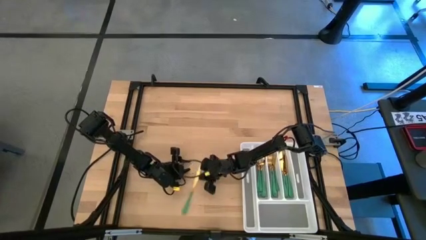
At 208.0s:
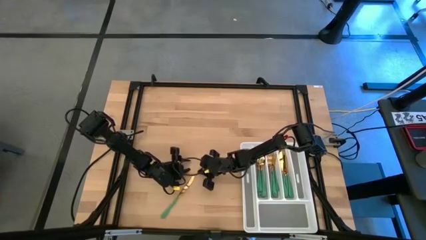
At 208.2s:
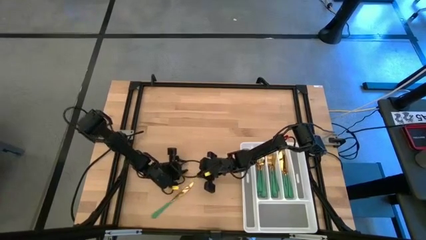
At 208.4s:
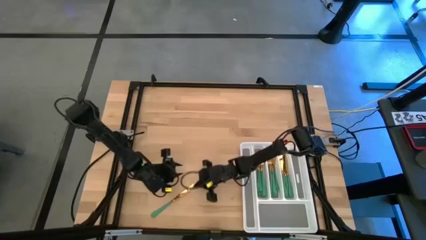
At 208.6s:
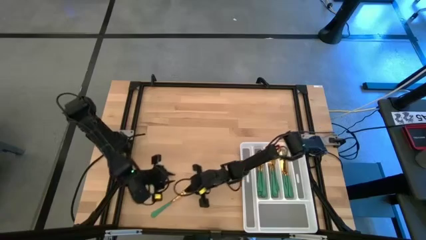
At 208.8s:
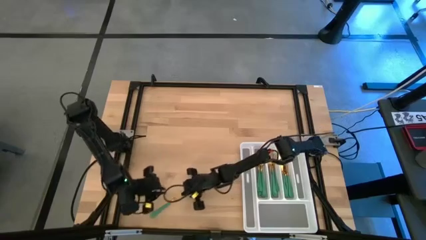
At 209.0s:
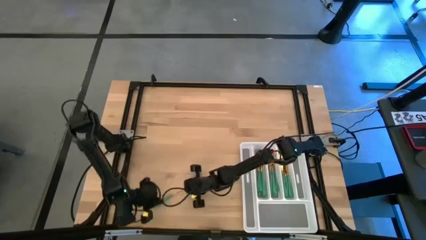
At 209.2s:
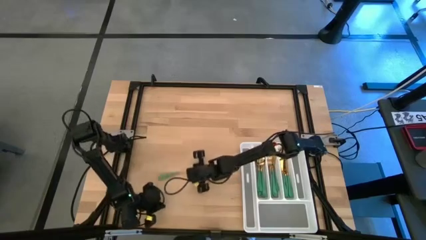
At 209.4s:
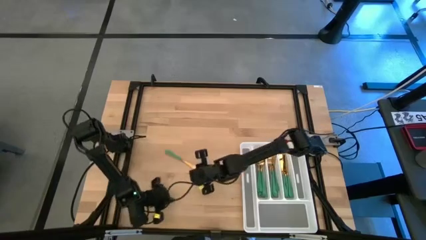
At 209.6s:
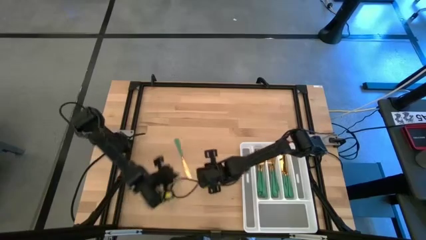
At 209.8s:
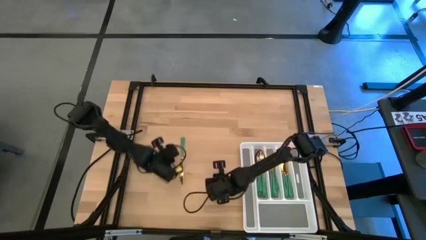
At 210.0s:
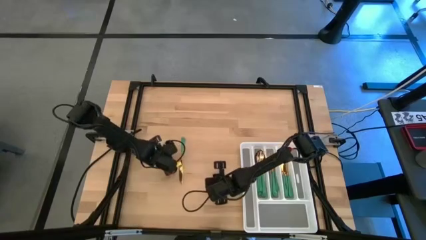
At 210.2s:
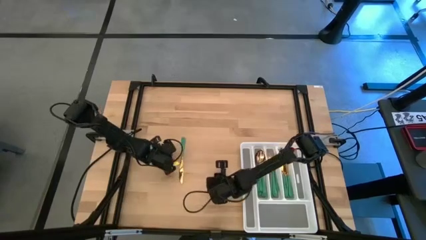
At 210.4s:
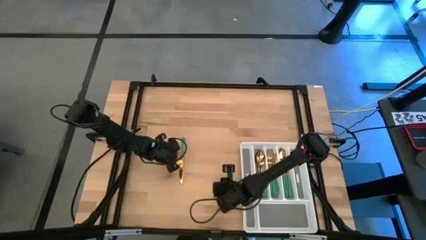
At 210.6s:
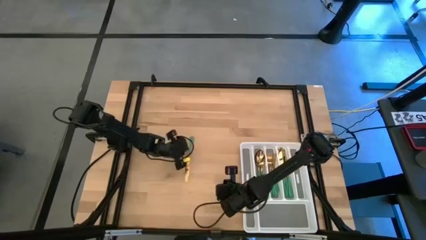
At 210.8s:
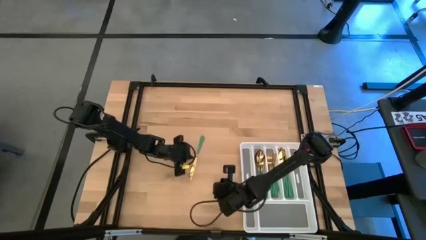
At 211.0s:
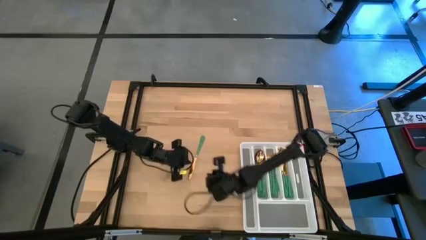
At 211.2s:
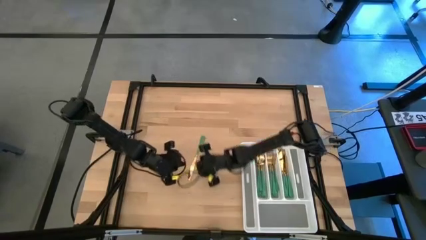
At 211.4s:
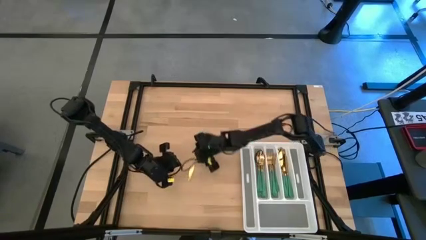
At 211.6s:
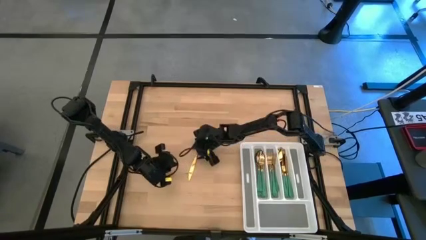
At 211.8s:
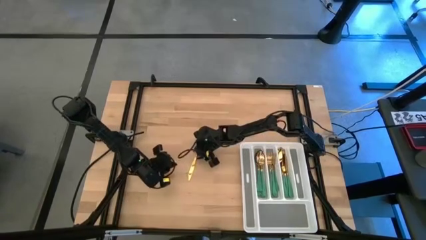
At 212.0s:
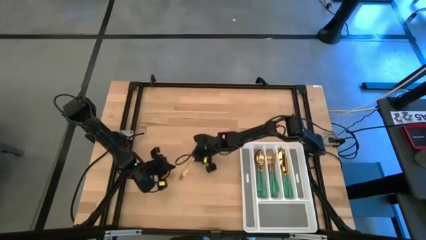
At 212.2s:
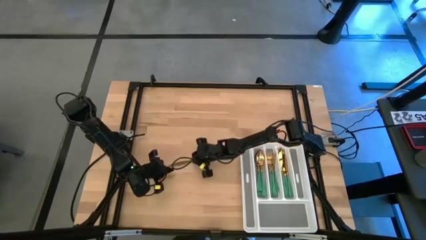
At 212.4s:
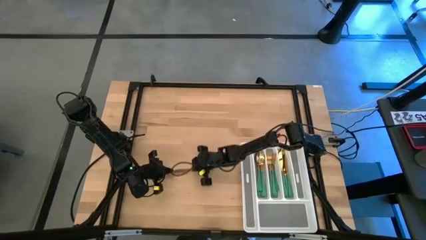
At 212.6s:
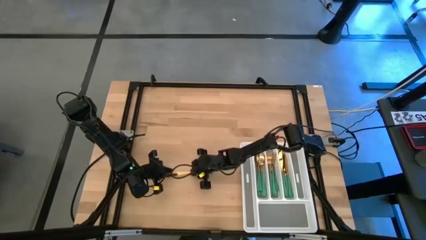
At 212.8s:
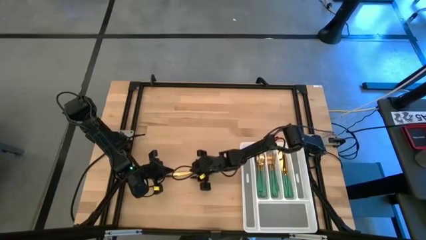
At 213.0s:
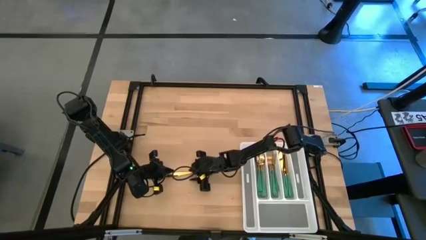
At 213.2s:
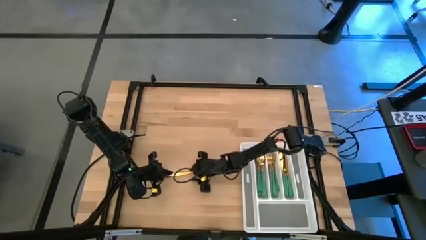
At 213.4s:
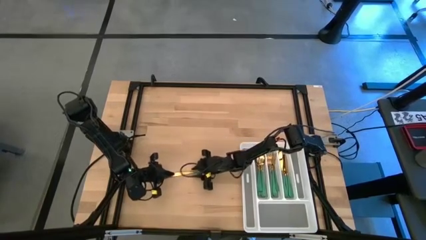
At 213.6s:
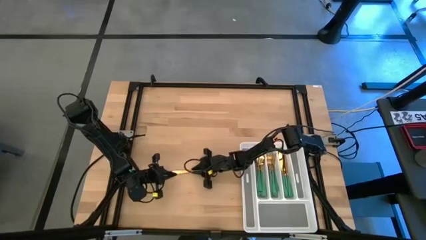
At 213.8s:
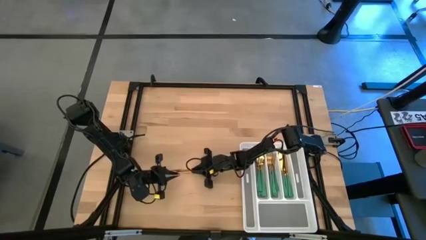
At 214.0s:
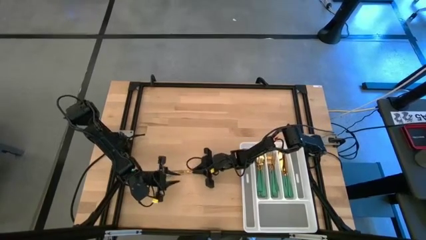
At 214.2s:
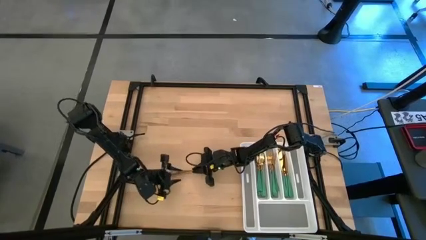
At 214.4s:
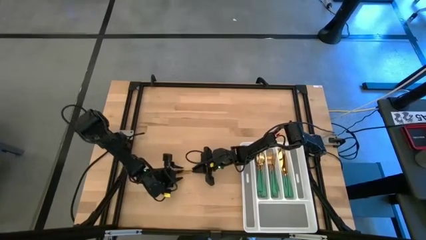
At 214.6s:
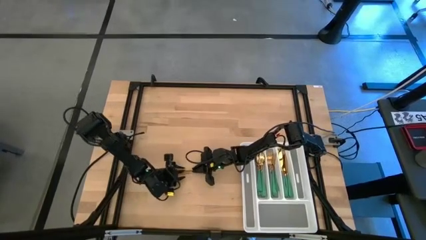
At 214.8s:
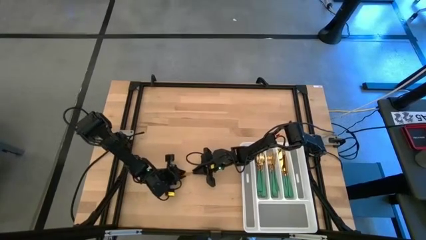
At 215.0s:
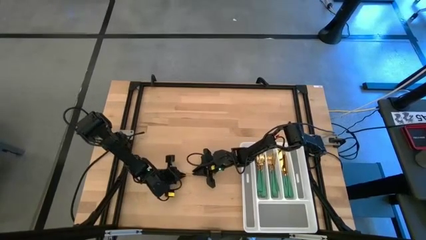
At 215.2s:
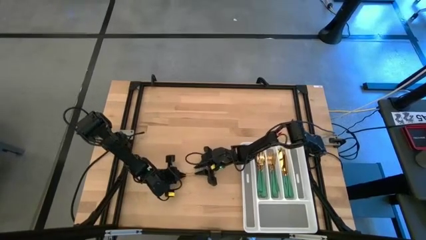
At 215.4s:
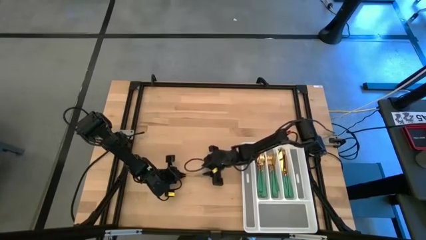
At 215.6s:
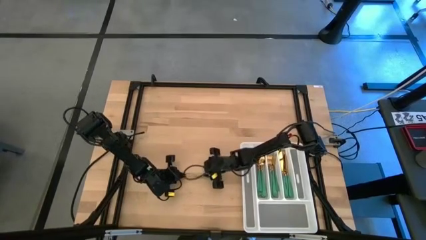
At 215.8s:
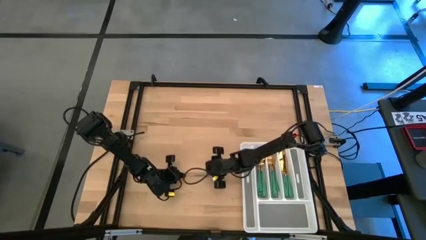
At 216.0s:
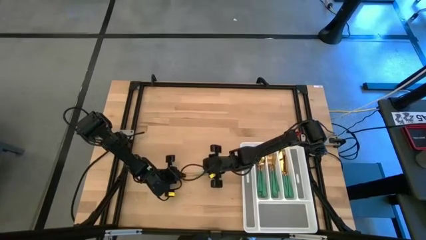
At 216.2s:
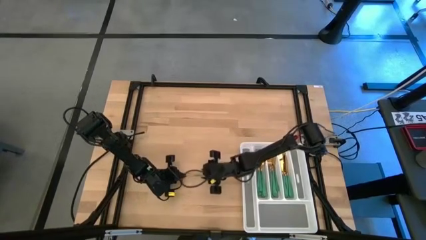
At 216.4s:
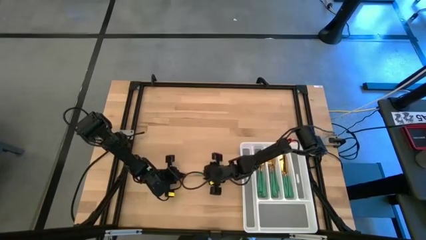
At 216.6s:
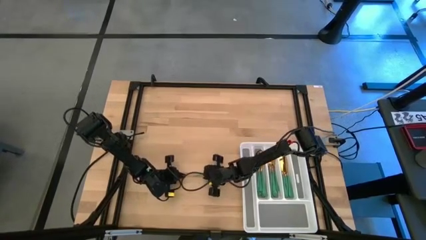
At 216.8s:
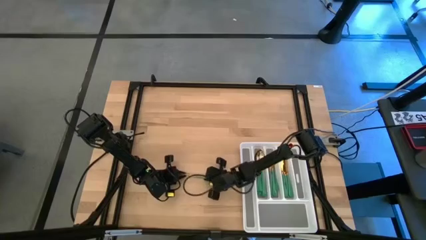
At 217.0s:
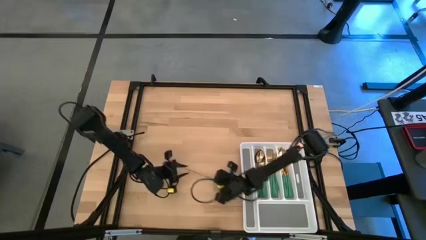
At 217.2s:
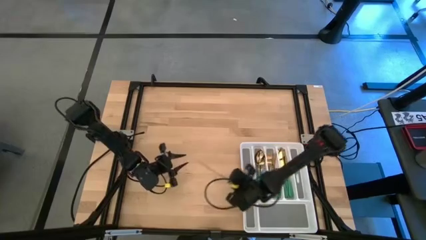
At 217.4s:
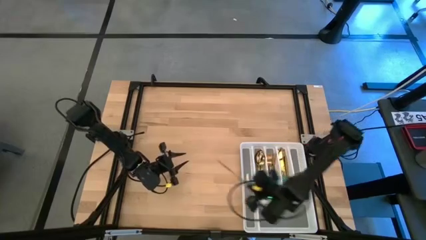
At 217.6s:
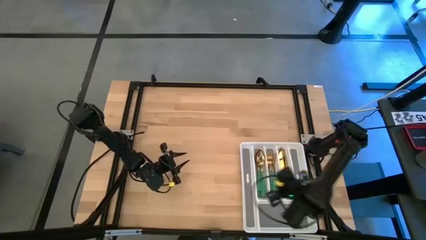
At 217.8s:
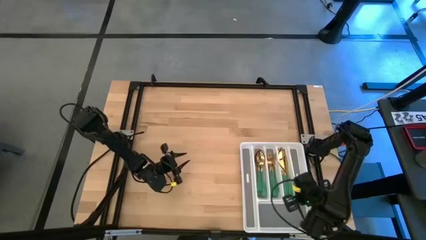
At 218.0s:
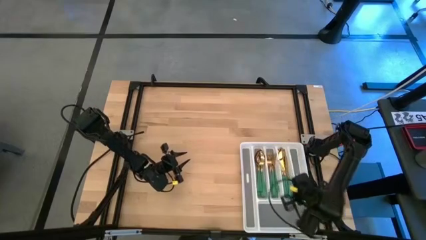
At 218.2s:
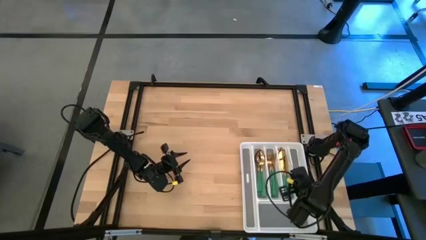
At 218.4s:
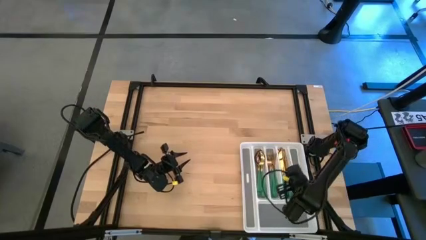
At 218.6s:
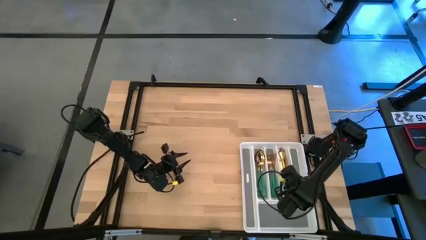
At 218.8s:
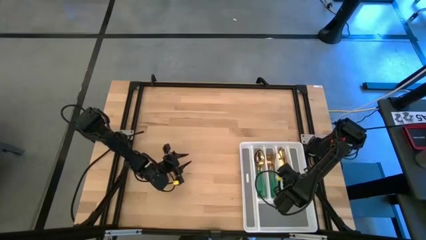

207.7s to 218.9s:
Task: Sort silverware
Put the green knife into the silverware rack

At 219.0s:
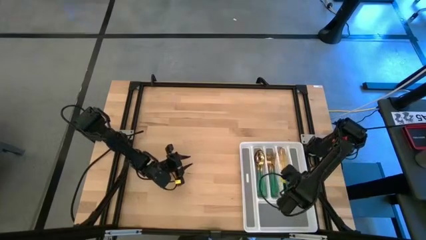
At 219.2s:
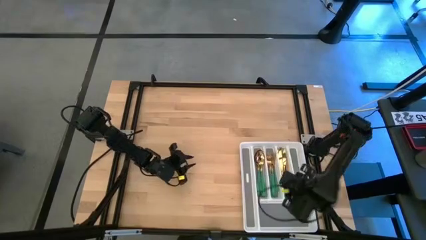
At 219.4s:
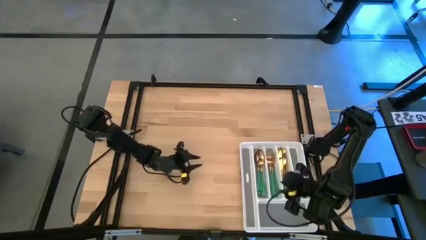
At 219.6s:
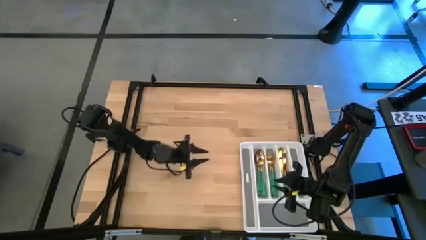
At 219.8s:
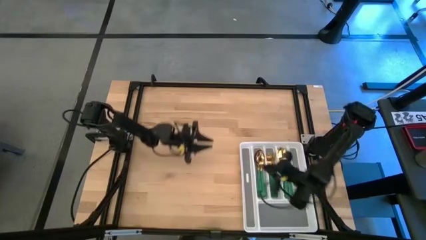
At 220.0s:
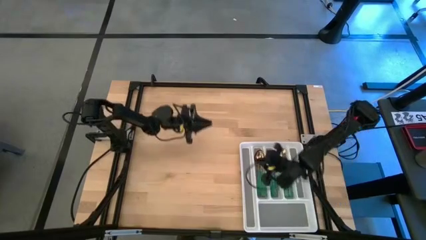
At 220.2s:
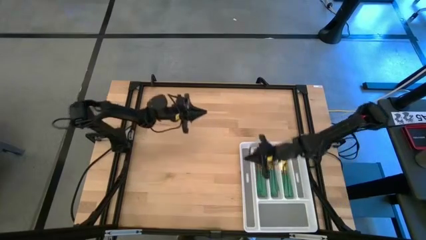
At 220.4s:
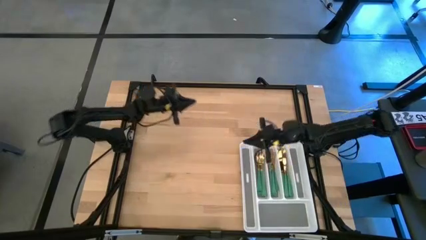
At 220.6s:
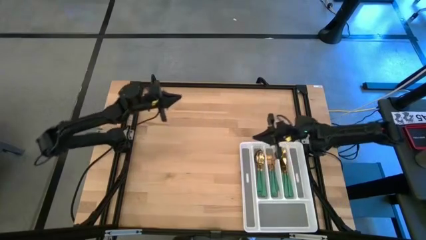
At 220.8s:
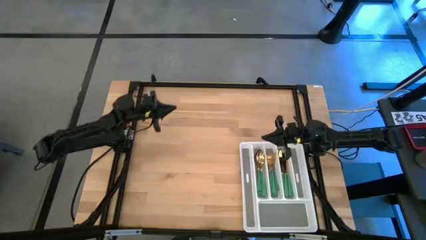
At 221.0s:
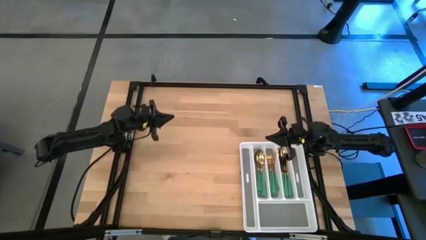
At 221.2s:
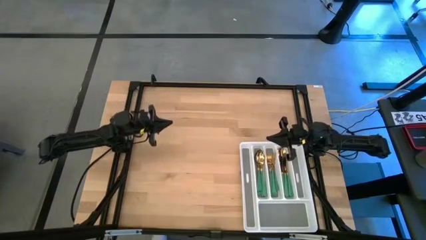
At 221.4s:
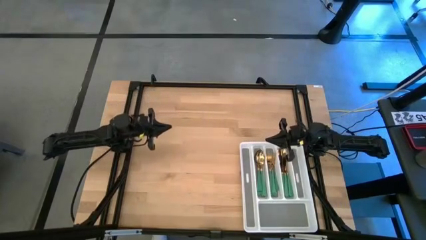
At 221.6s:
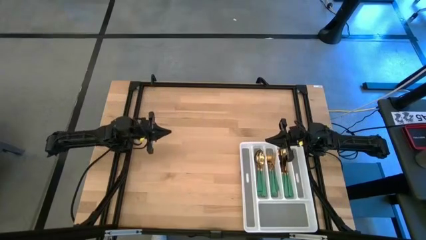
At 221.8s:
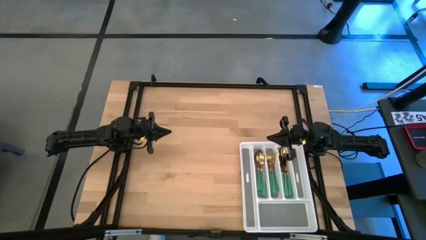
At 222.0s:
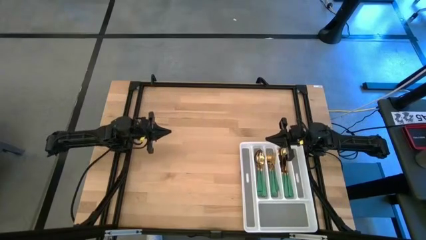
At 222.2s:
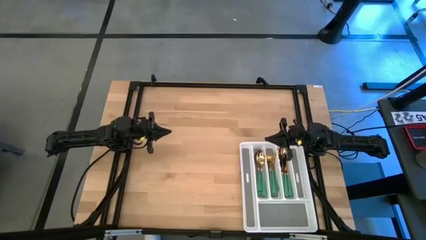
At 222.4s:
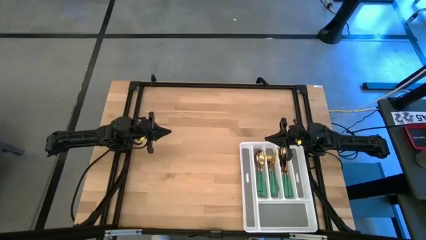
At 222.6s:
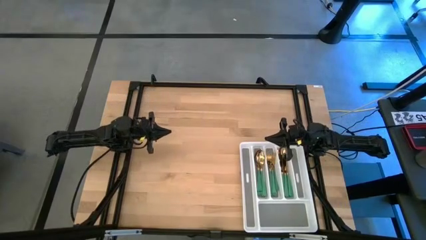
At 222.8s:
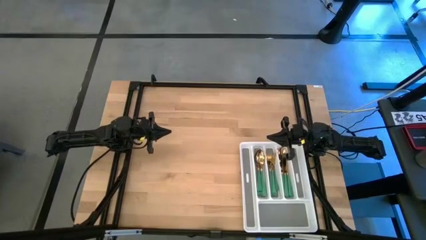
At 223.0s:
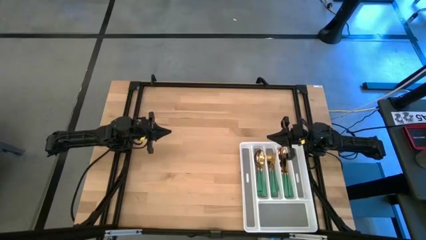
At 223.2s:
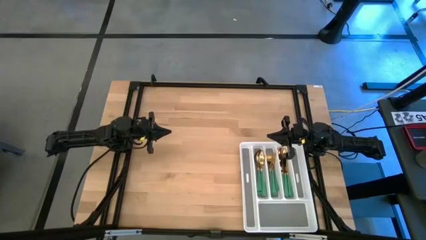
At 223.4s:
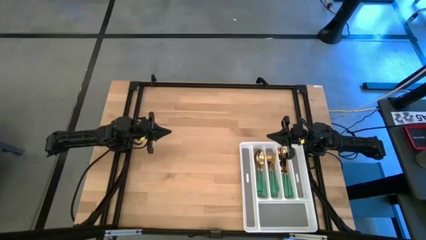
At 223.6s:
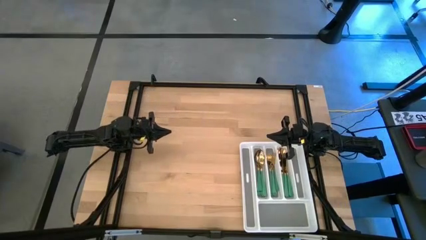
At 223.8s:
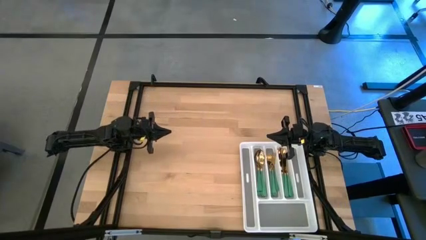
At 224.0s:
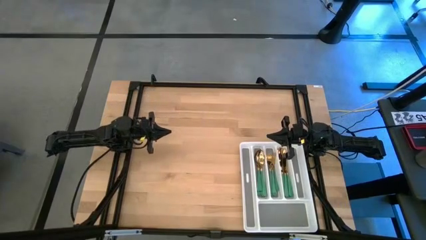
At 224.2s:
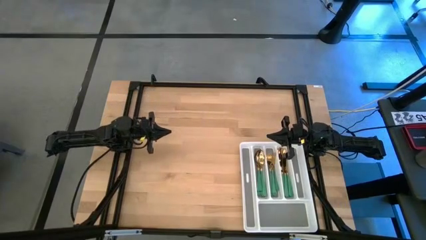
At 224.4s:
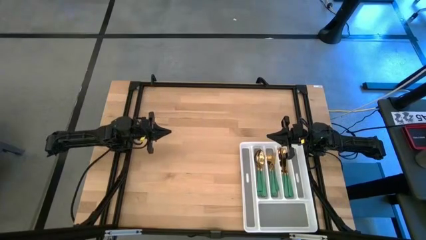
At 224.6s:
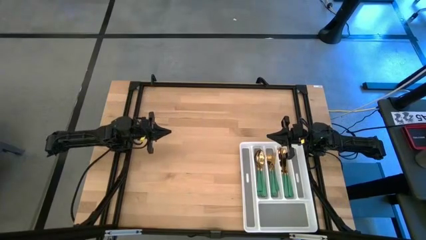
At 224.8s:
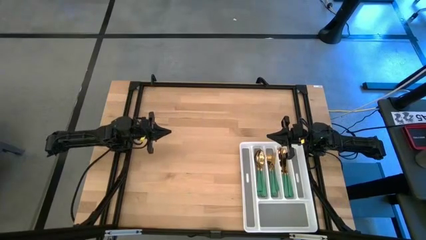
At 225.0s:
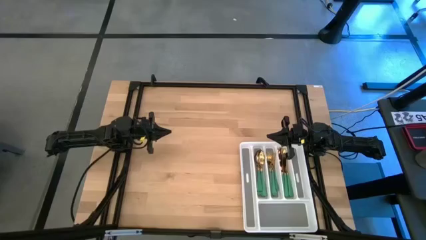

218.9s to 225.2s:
Return to Home Position
